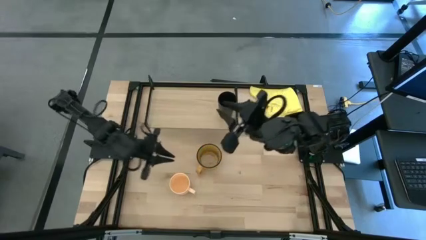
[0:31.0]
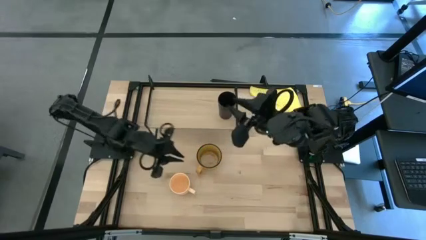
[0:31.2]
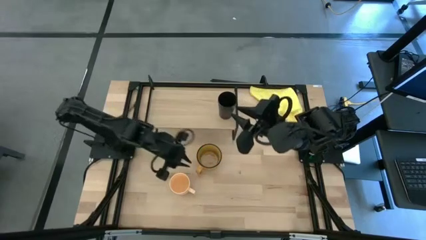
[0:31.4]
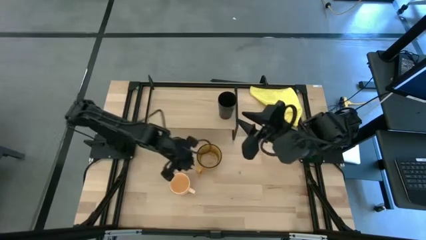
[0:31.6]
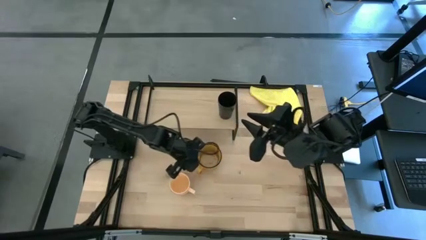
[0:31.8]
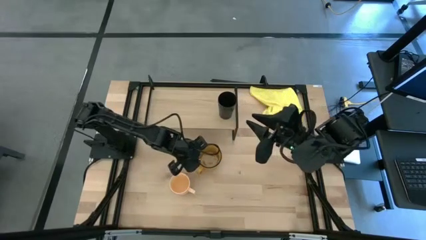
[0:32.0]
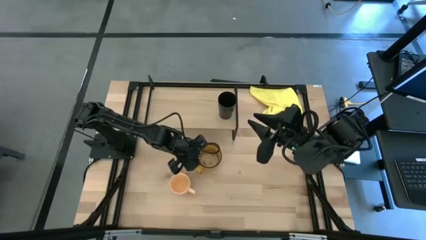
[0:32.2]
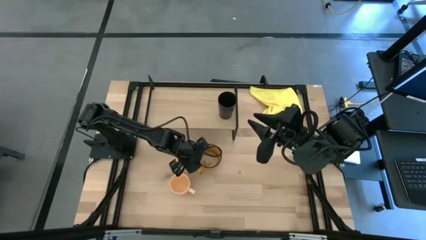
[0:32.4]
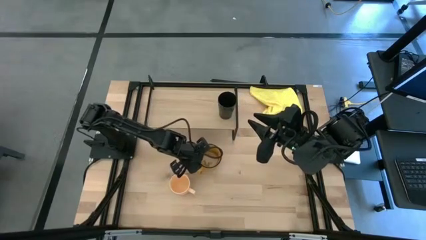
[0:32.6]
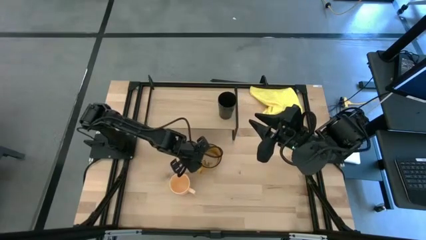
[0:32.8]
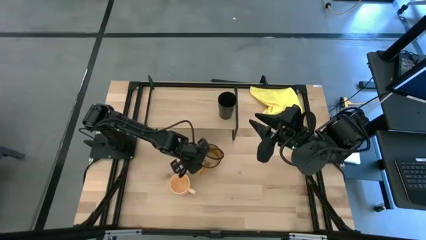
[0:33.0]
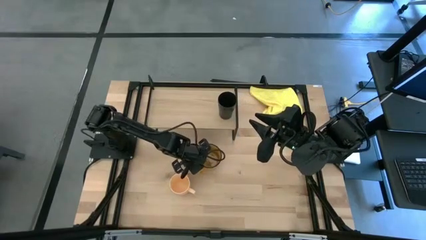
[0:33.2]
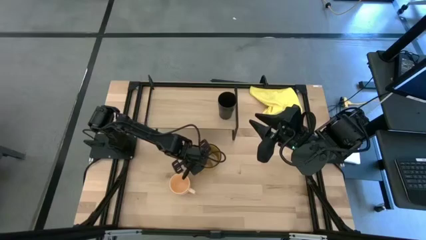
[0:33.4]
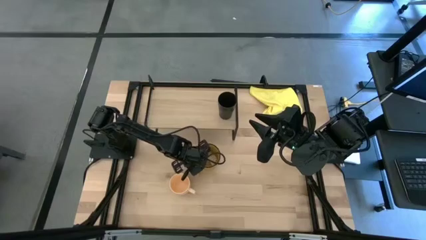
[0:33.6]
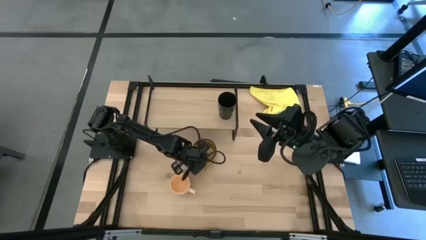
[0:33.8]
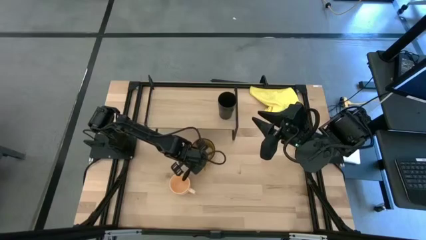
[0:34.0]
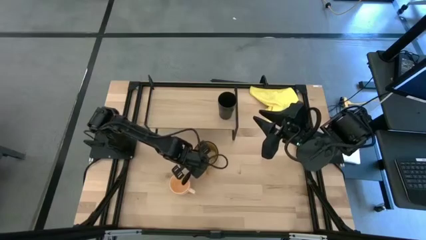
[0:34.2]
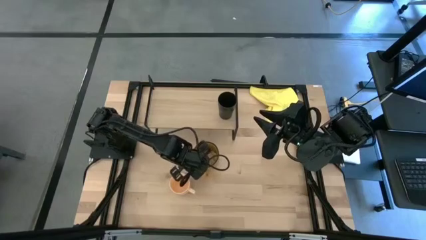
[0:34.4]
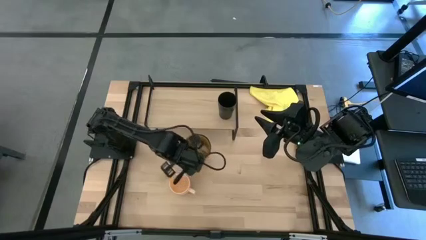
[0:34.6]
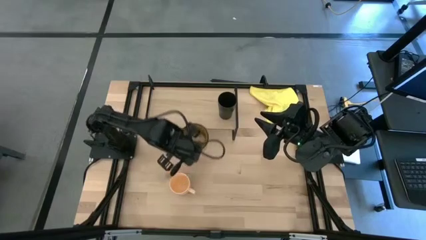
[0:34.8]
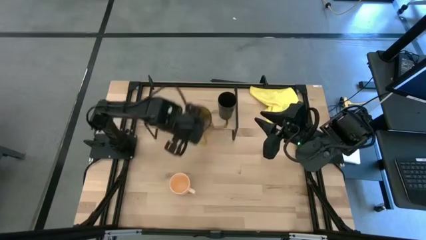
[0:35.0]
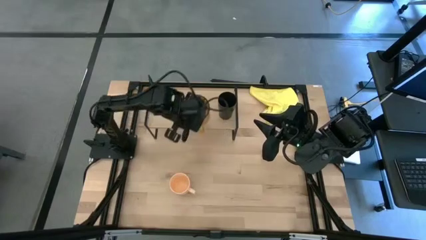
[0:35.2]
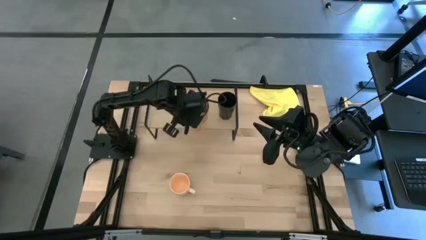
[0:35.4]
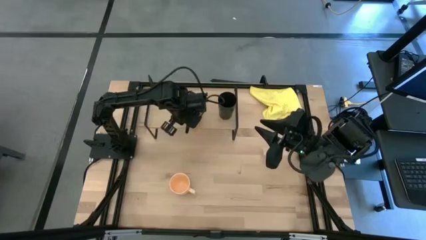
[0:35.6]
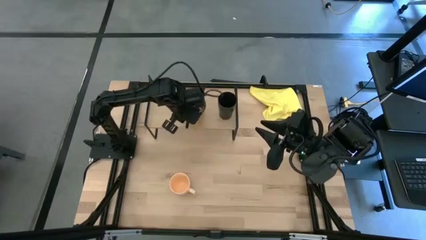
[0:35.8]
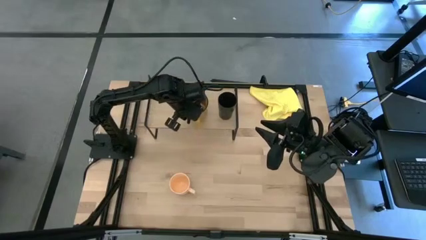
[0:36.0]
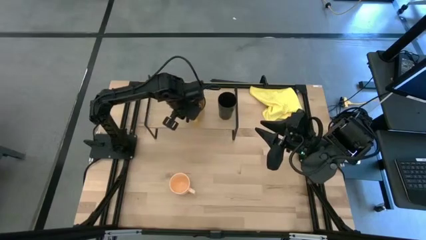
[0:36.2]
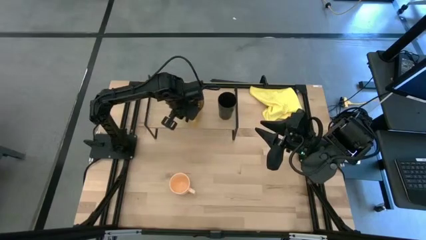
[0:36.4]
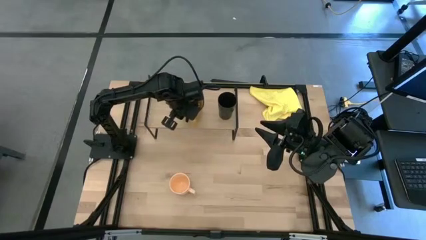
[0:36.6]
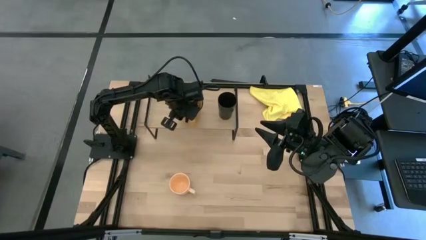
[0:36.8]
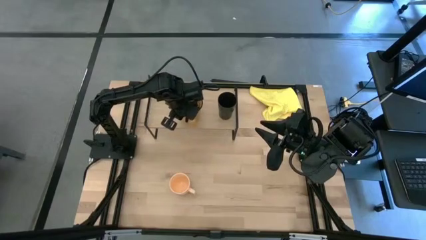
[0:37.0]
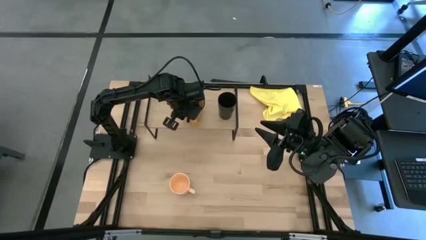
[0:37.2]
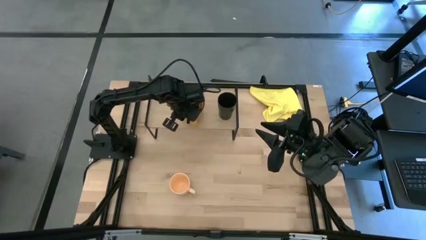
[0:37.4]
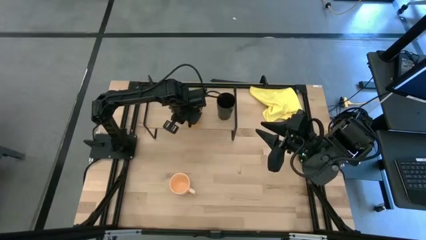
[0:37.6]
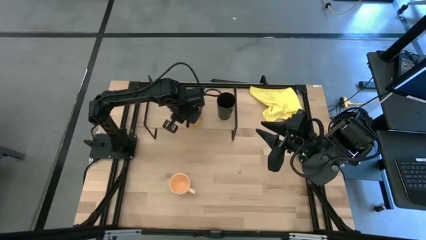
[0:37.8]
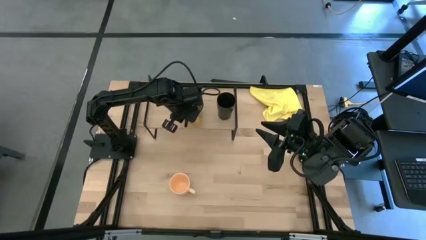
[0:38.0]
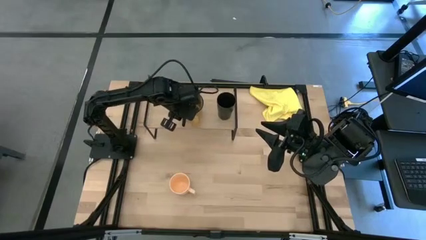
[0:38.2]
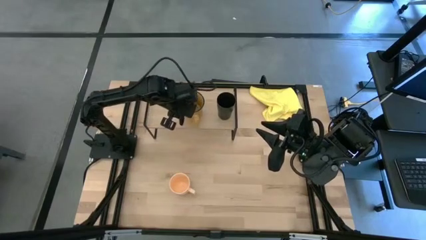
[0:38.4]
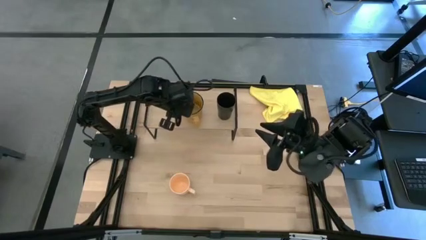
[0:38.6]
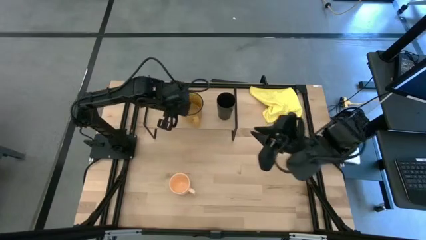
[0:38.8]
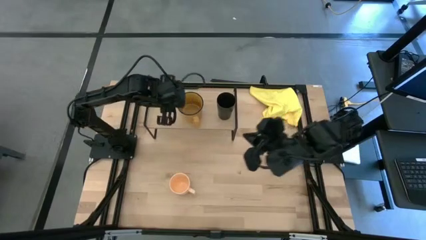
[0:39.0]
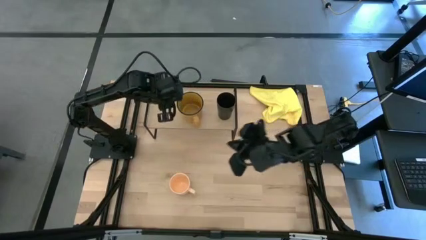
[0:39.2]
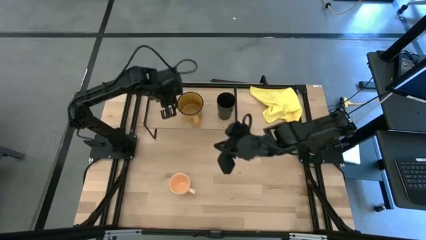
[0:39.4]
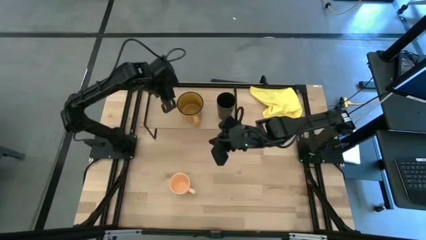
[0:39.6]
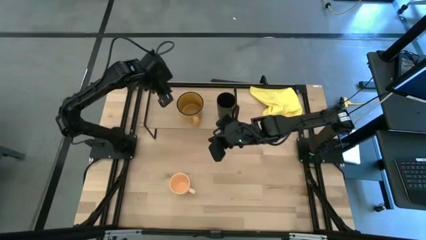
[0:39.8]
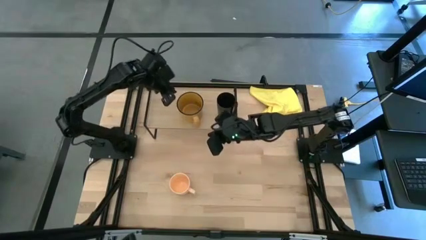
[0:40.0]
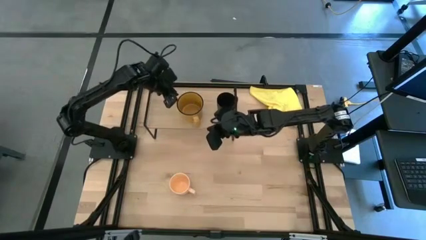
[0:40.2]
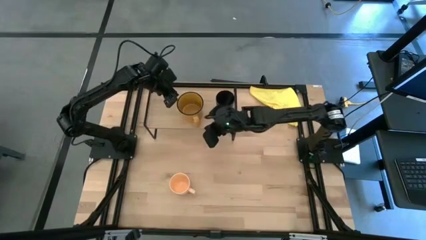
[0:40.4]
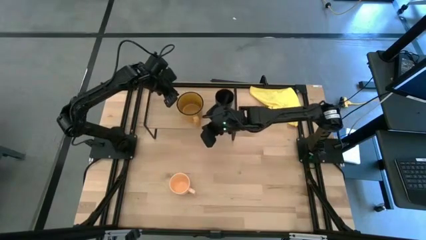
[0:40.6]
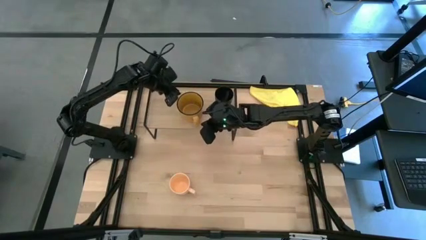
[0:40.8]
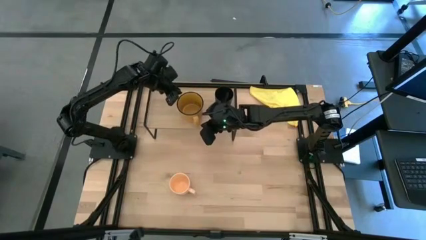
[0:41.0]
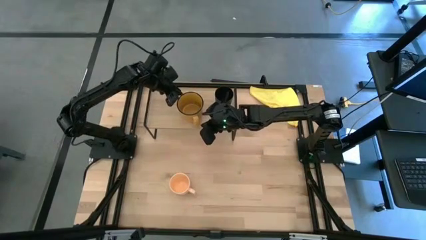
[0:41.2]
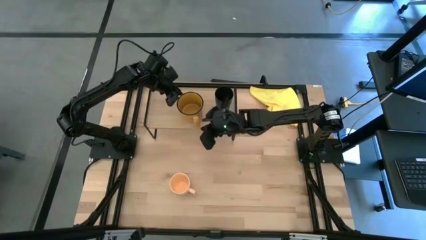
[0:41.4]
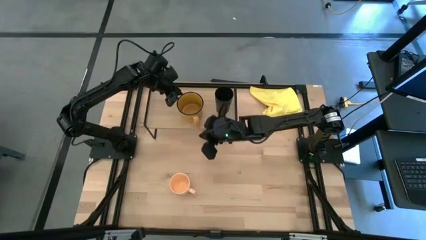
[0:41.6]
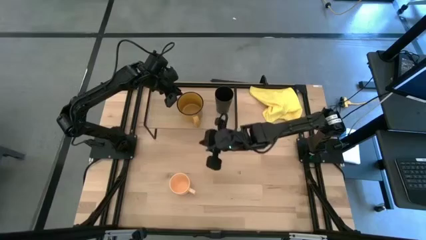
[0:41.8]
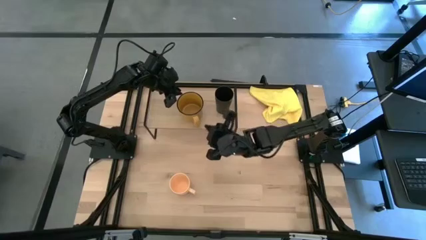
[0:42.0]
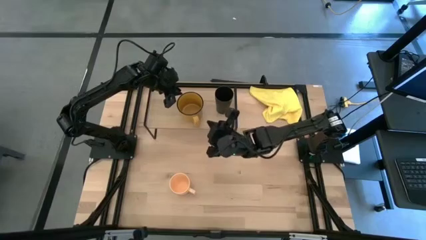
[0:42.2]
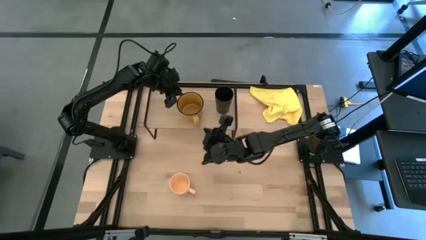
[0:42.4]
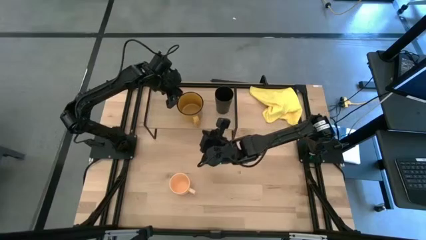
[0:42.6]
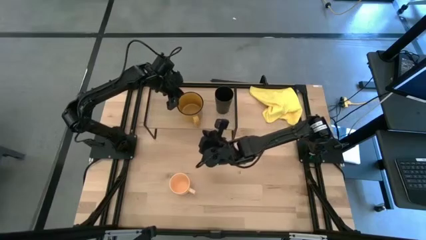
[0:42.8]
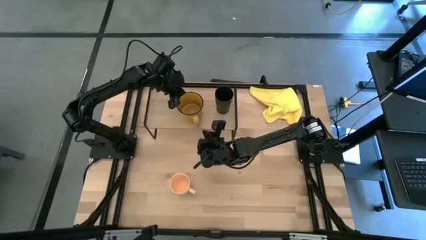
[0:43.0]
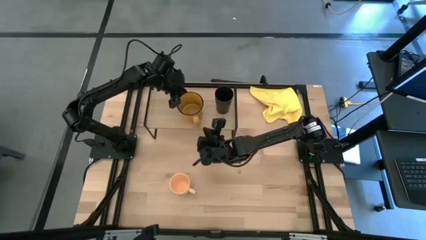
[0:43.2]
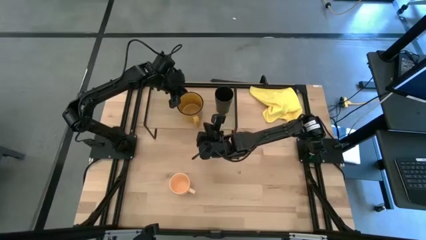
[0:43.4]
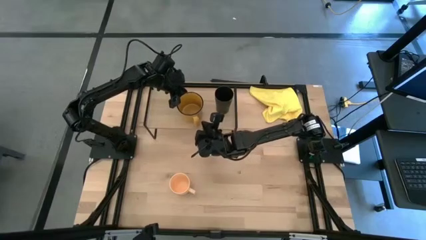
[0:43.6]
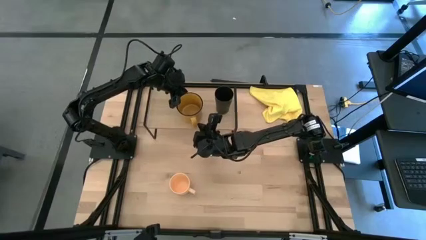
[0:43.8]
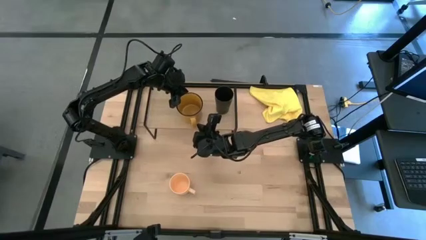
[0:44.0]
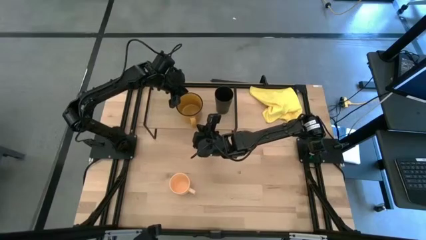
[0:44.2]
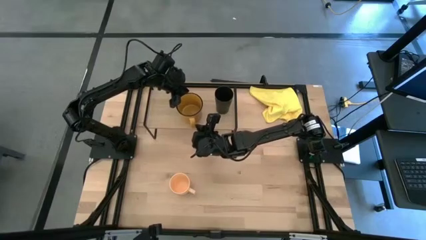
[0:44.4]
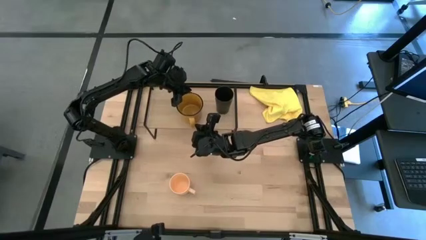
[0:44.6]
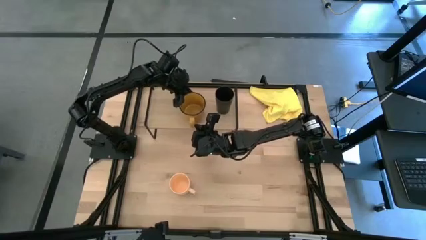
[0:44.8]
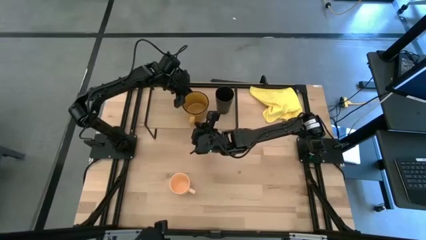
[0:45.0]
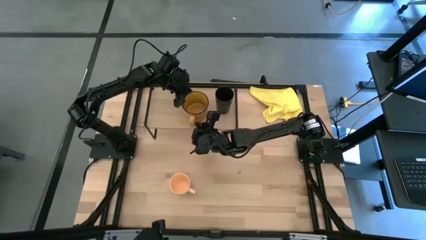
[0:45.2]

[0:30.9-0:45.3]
Task: Stack small to large cups/mugs on shelf
Put the yellow mug on the shelf

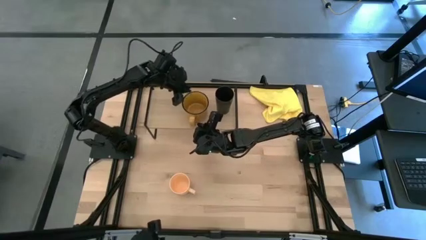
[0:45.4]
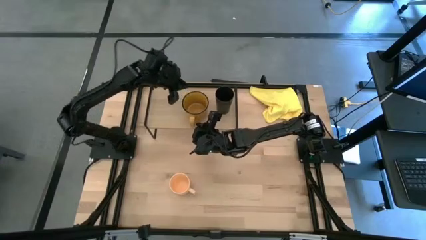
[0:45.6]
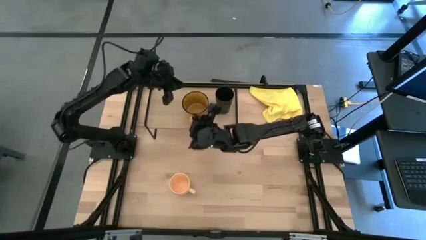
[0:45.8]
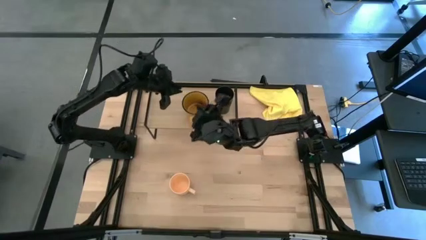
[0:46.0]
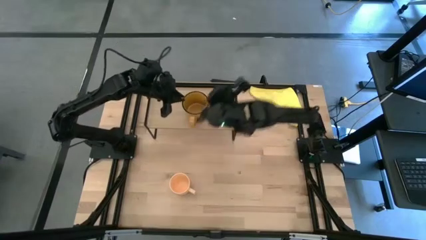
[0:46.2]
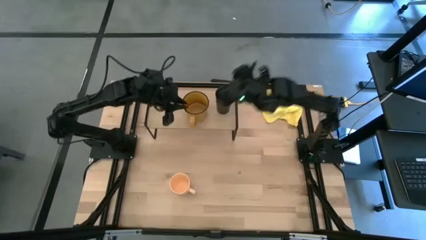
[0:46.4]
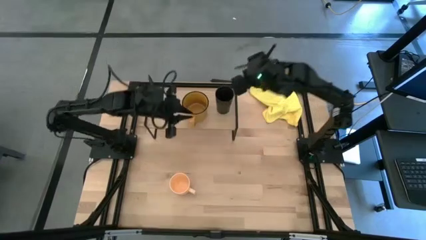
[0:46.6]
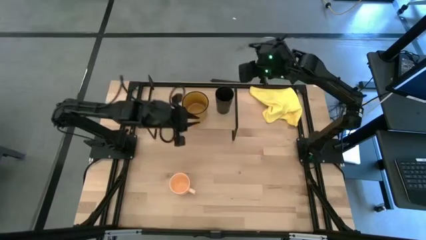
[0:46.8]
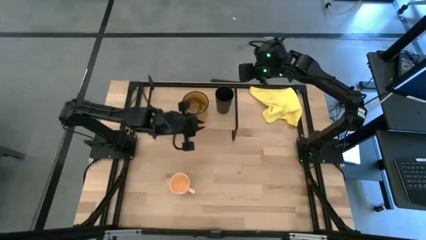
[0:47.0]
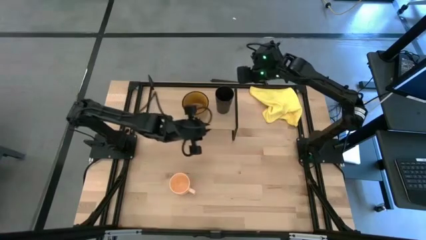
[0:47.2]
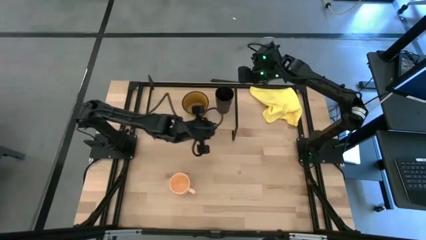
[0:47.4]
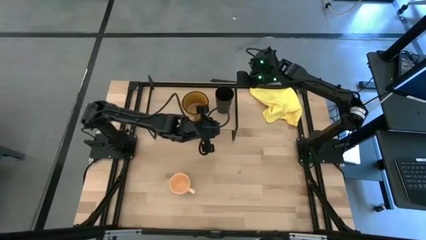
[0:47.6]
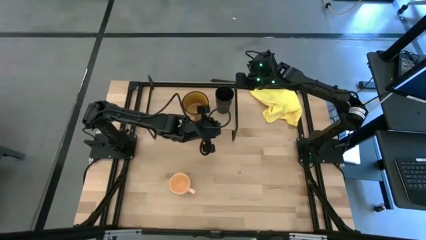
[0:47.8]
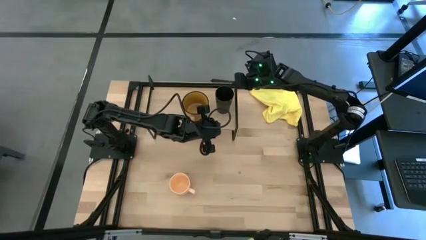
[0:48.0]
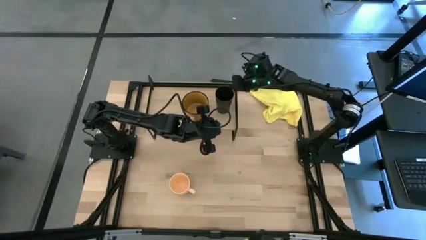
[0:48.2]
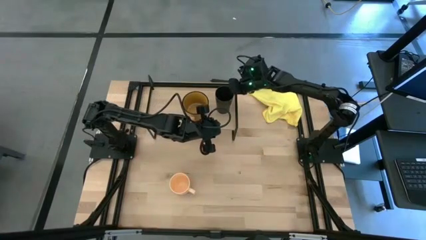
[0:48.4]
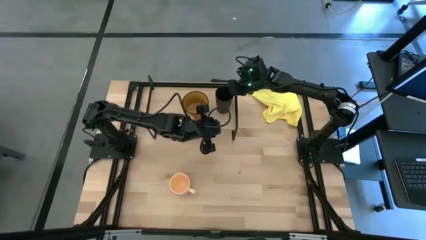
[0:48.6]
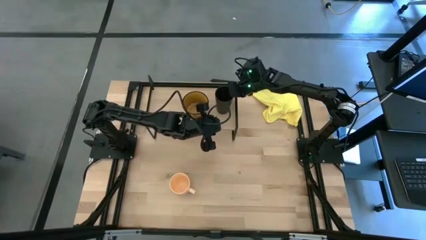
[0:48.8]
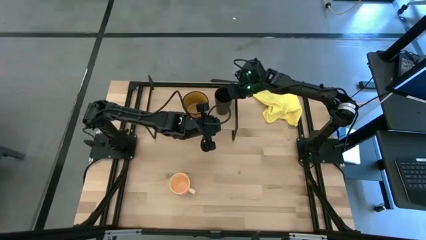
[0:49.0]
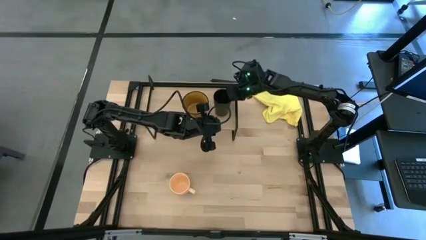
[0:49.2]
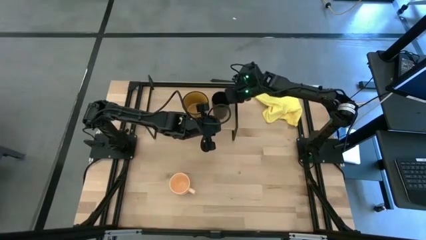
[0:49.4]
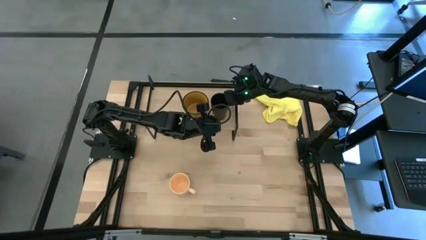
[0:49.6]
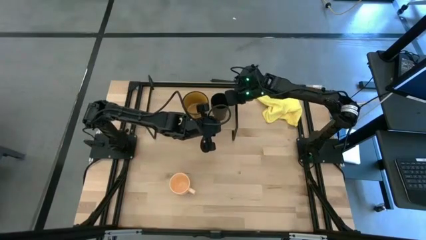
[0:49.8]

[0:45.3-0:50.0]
Adjust the black cup
